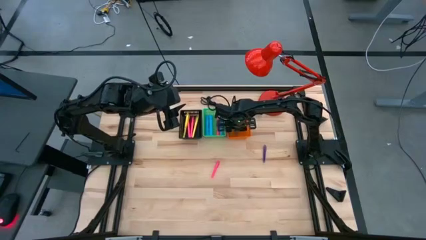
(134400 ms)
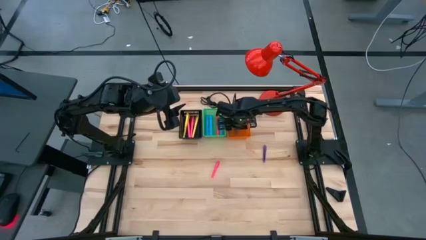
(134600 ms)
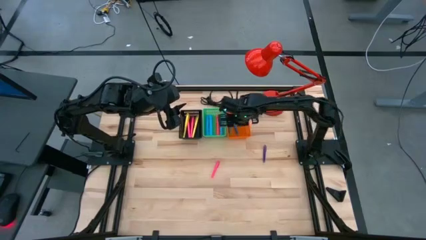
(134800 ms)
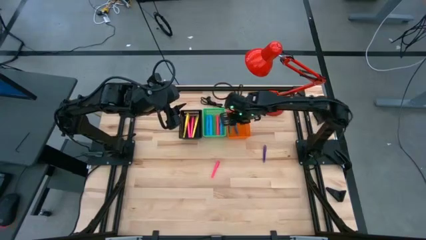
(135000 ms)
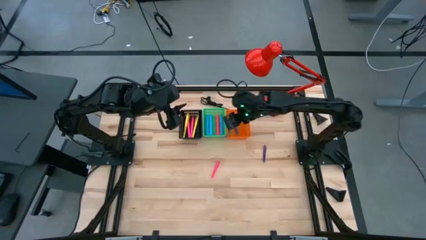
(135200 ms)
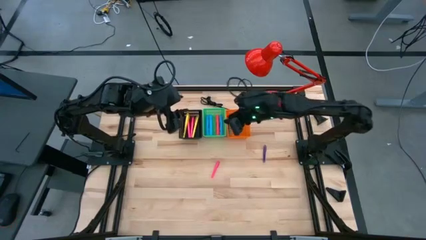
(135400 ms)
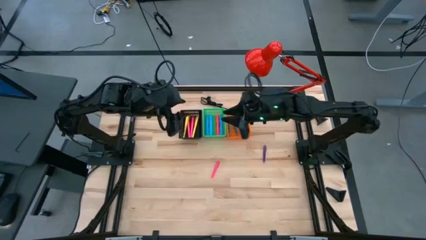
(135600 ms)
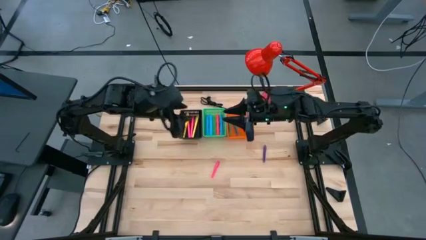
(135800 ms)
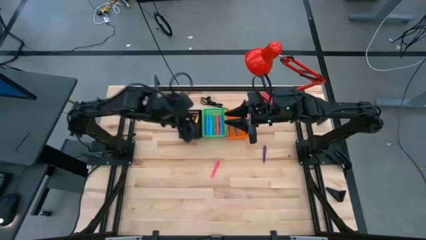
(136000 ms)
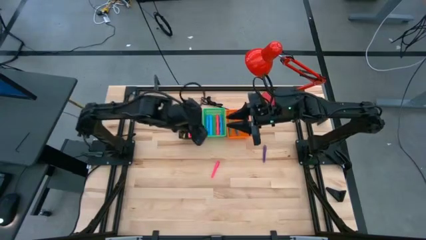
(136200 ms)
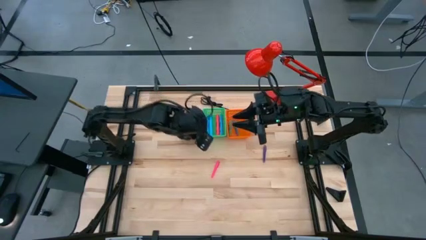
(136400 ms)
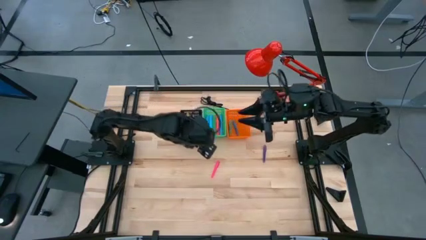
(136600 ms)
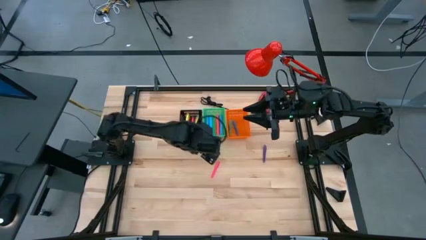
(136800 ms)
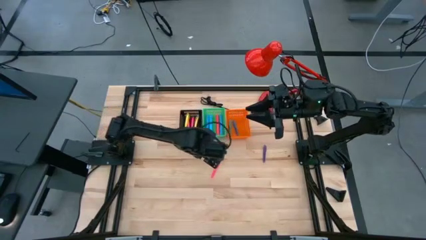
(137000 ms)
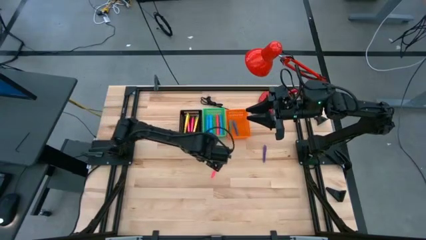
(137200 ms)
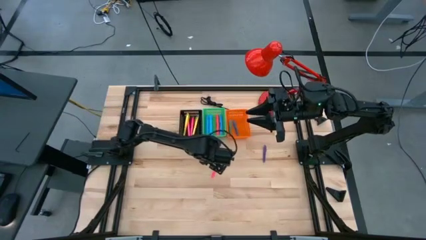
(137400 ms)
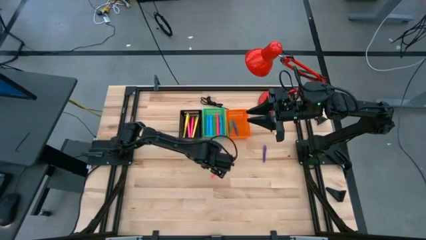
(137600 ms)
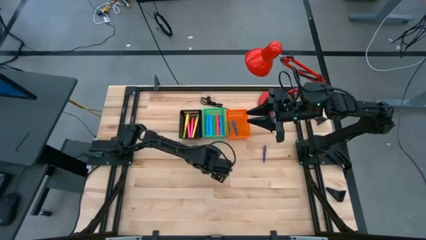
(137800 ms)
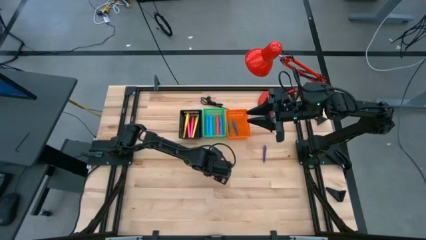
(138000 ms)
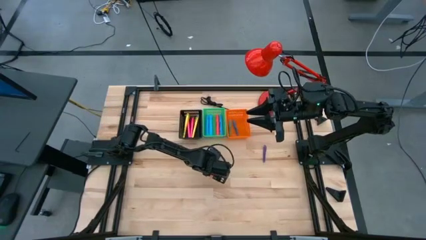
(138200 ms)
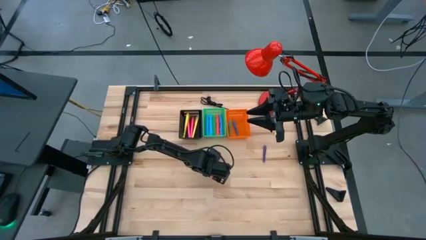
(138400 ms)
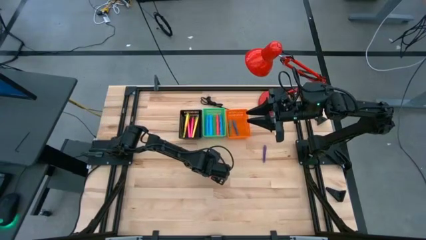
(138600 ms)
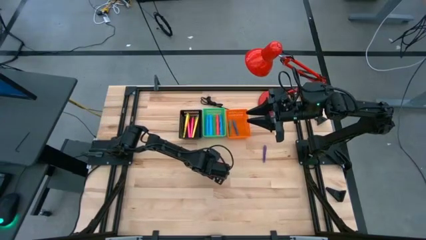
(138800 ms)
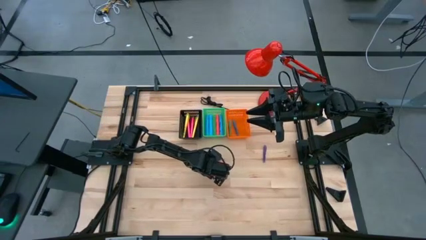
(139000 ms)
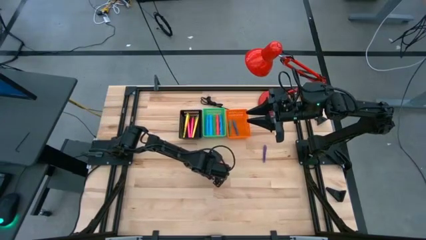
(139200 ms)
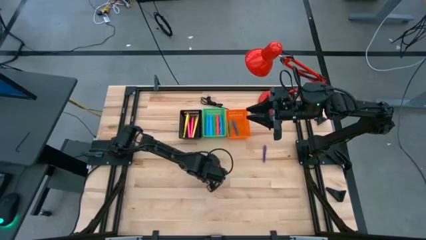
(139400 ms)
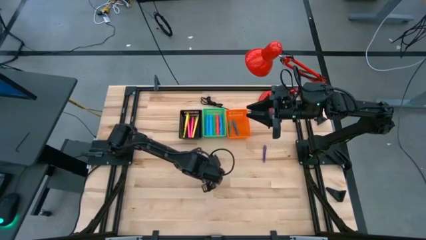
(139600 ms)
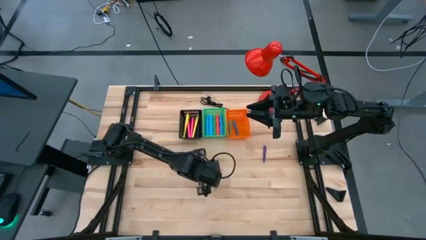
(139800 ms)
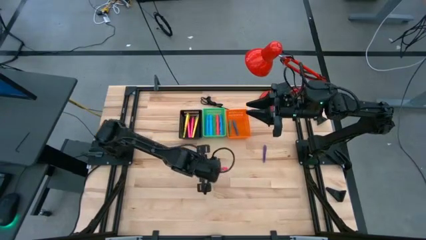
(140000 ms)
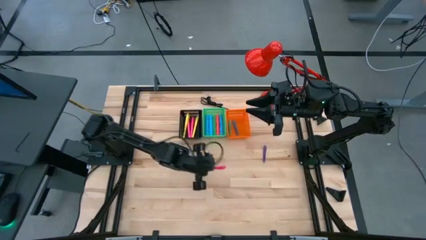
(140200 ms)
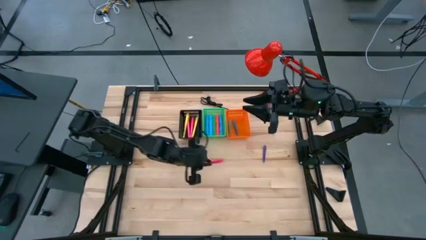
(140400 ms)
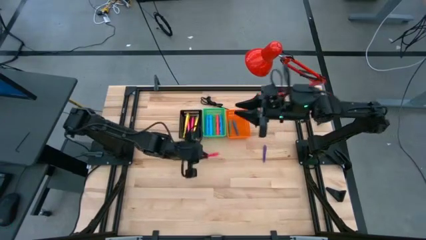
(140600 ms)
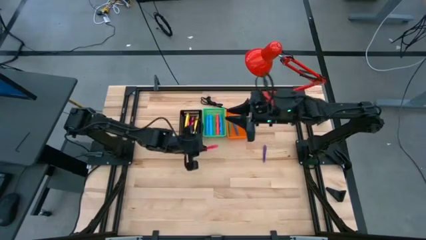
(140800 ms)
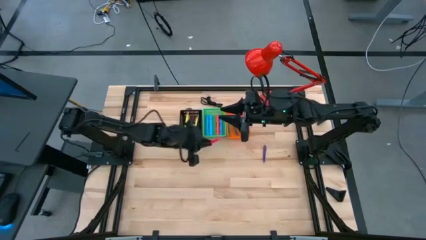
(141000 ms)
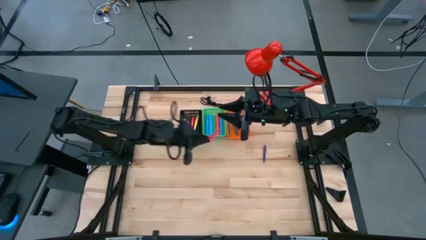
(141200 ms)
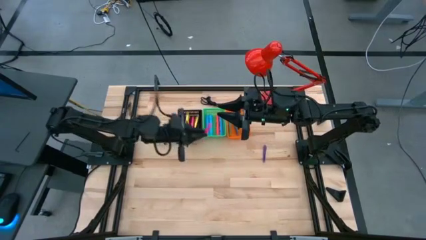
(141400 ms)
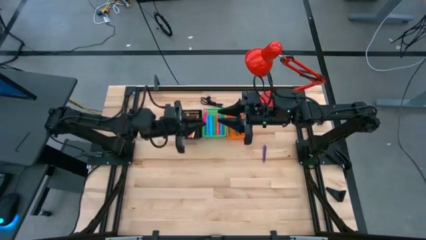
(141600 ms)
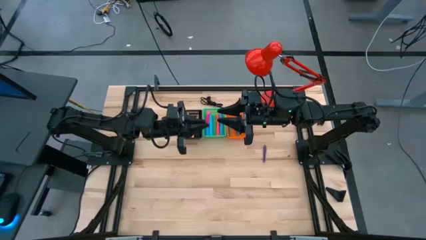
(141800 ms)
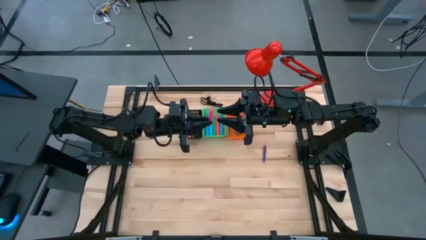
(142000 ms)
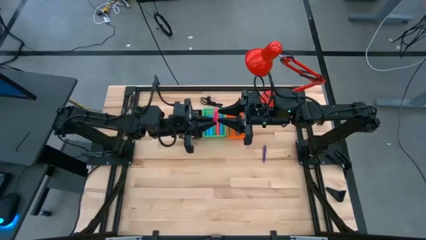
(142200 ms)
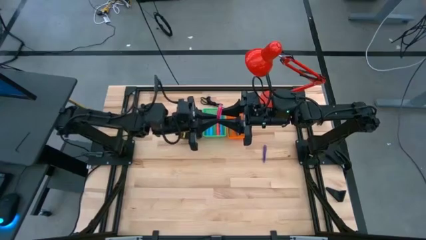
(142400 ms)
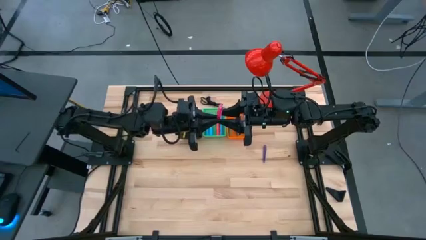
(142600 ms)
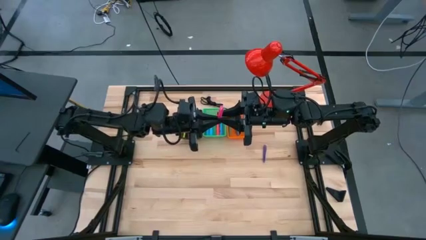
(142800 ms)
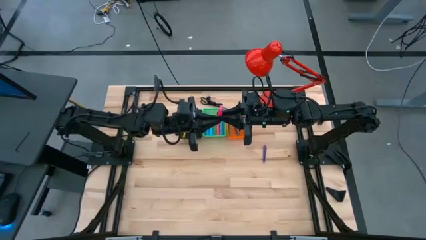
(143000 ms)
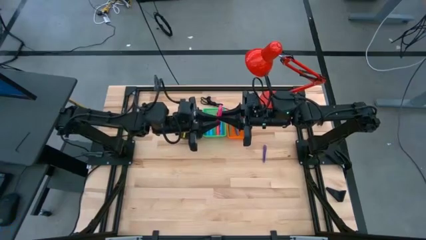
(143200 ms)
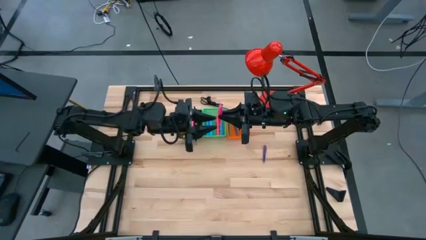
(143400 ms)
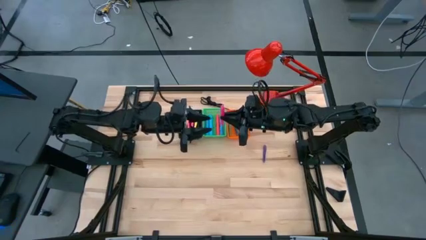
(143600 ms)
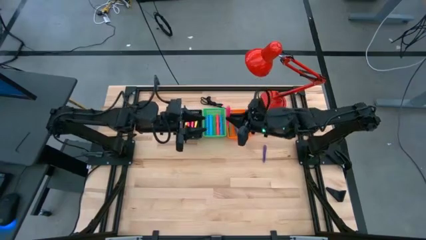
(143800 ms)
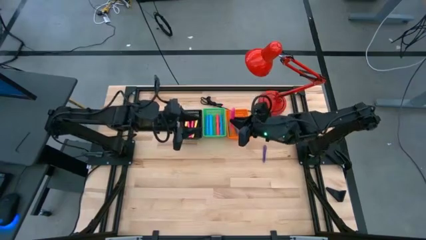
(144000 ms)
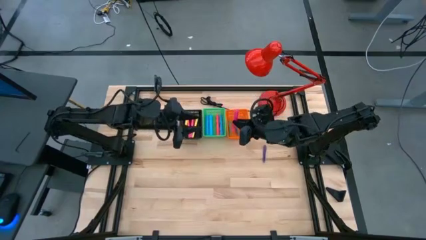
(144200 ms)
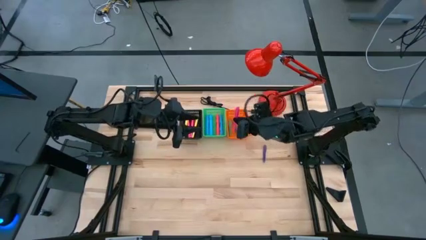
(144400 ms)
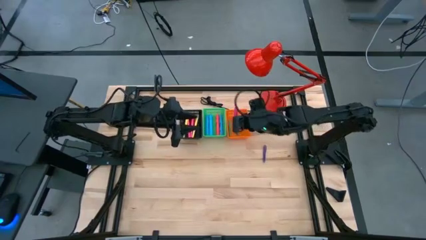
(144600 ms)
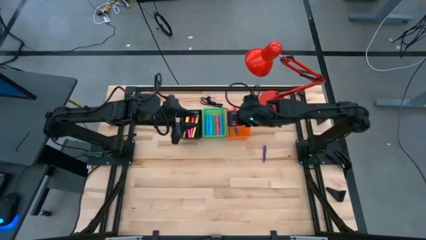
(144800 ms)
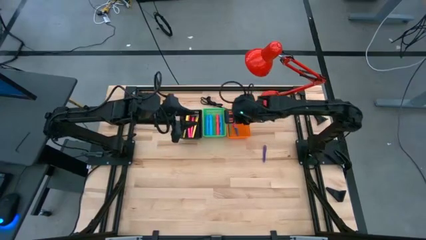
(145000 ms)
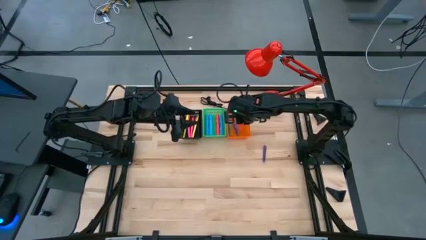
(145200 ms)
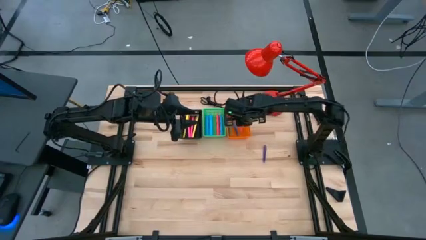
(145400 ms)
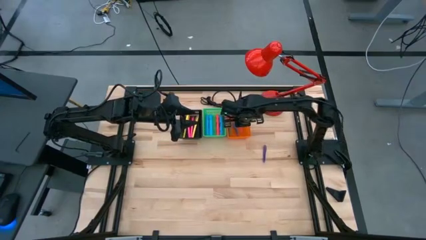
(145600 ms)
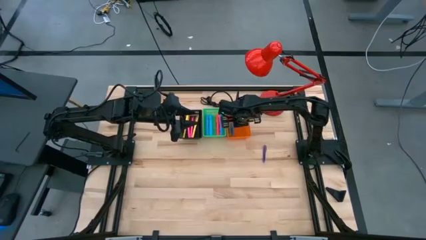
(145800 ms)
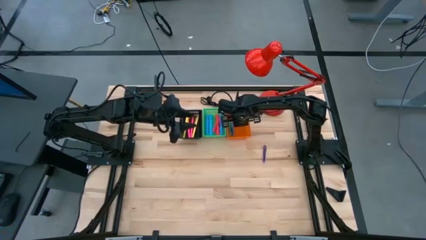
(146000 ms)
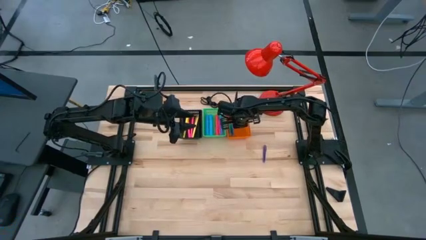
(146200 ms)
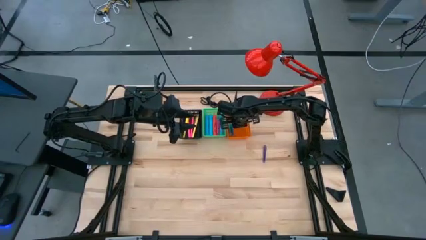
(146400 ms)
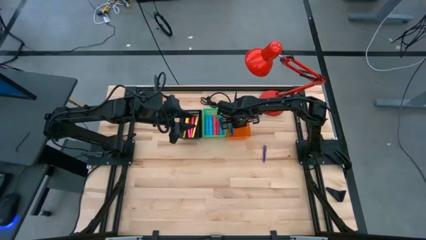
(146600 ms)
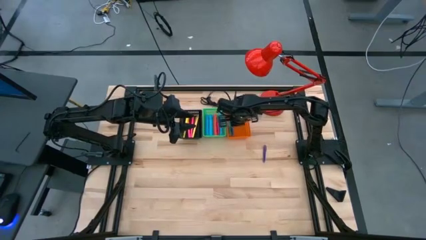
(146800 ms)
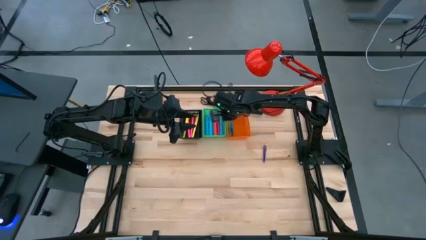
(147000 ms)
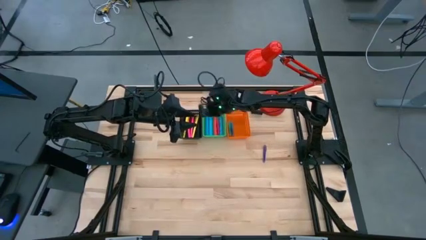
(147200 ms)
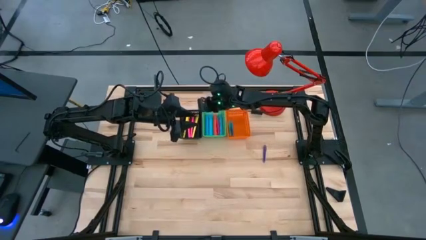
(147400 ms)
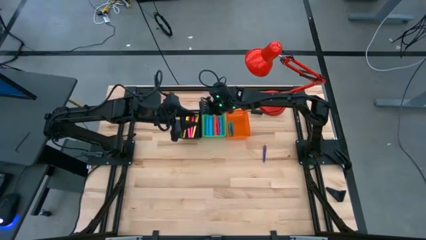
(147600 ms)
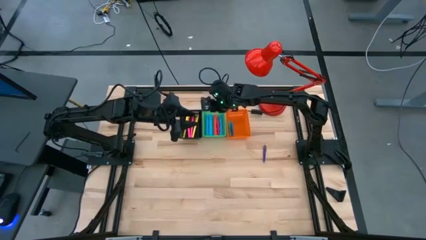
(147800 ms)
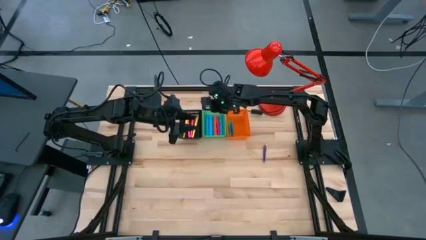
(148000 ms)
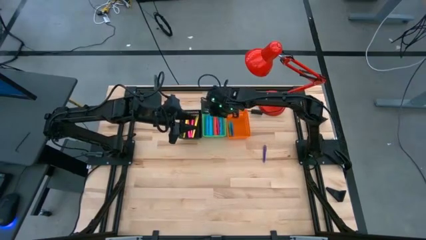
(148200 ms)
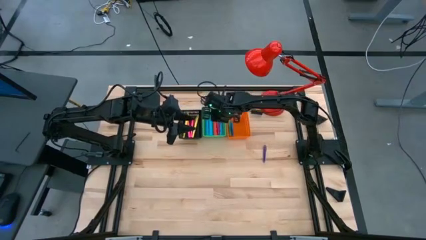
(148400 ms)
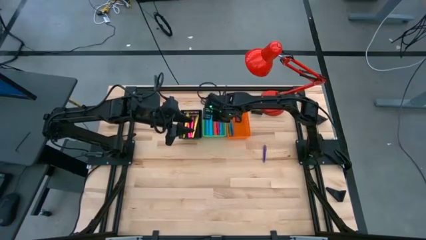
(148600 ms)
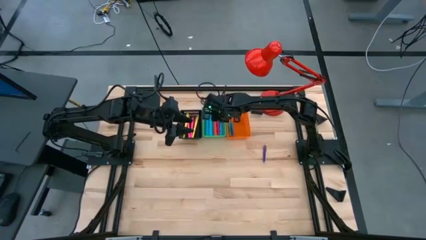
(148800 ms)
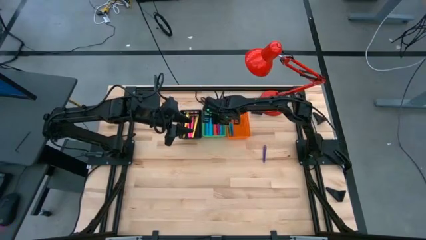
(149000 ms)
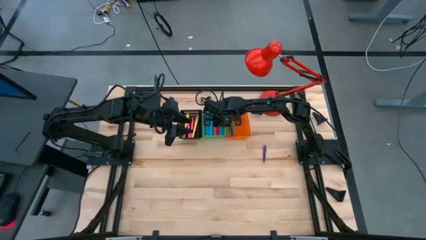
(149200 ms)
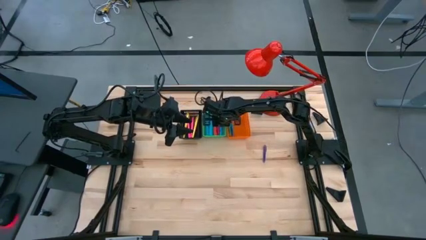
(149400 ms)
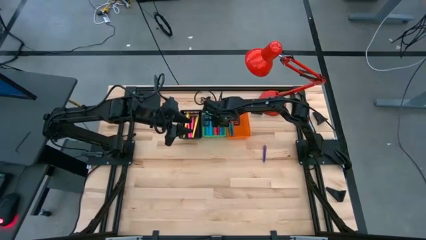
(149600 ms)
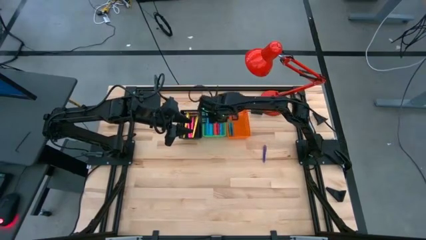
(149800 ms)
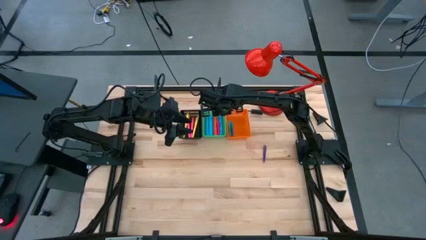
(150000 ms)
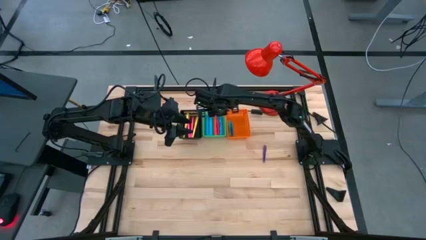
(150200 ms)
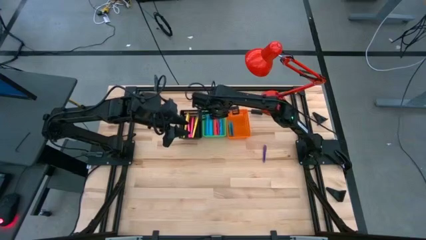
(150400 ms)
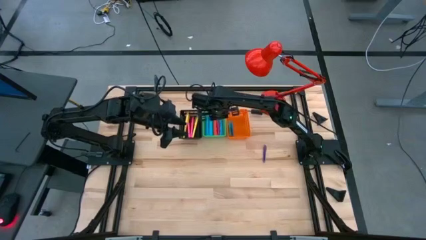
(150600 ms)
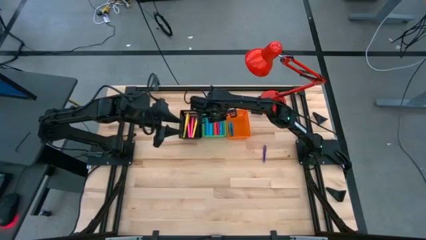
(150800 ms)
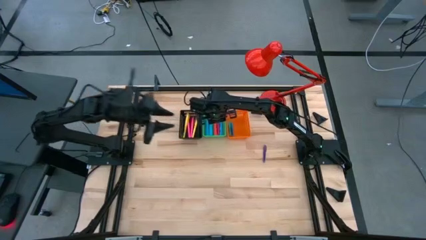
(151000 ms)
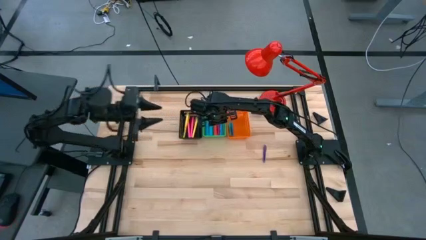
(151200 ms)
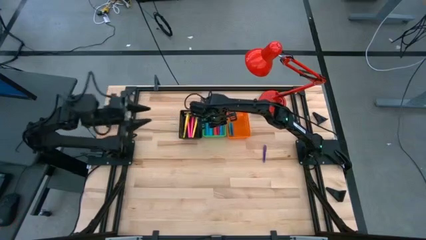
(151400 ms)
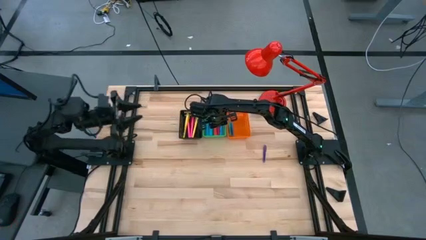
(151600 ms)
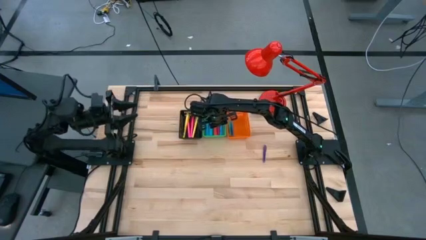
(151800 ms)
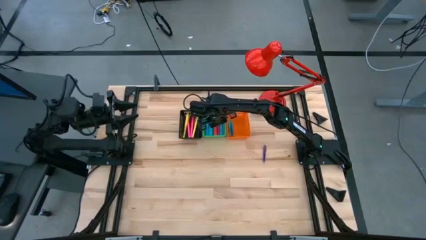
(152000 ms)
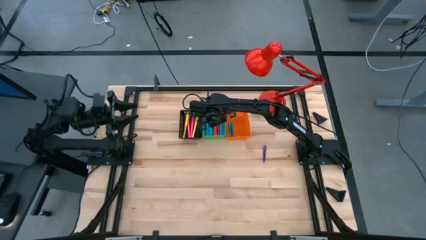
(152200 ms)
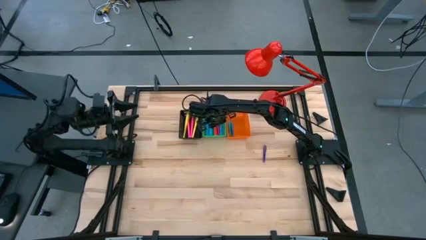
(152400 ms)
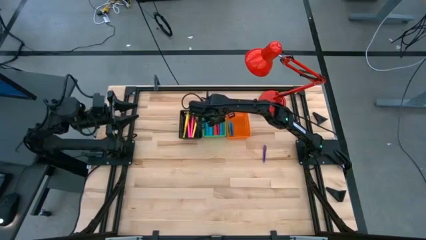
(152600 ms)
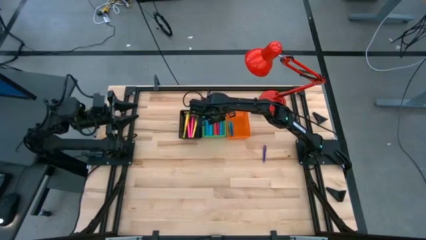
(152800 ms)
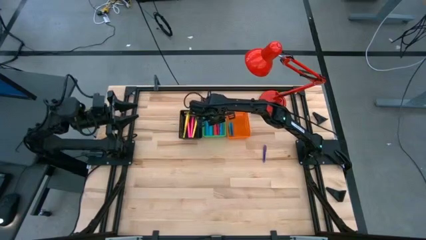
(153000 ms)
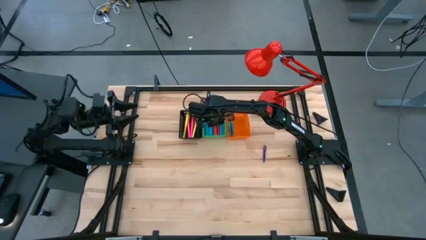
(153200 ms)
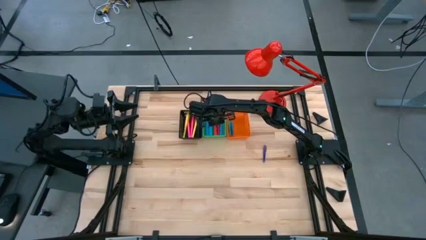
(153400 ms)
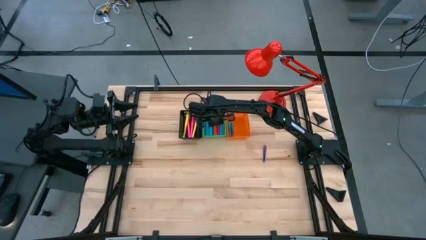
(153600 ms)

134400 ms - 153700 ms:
Task: Pick & Place Markers
Put the small pink pen into the orange bin
